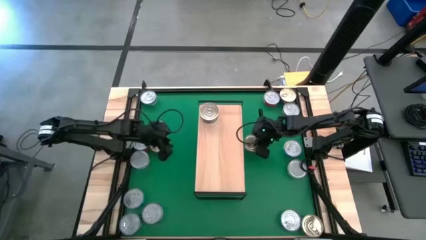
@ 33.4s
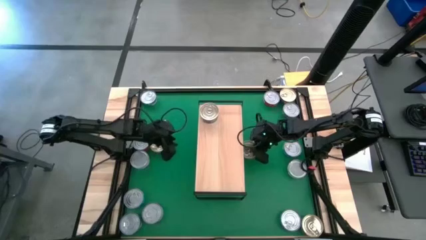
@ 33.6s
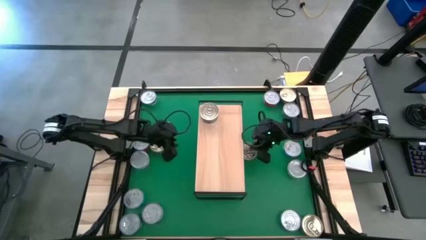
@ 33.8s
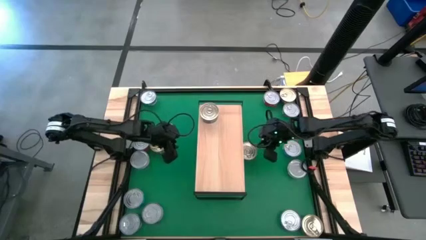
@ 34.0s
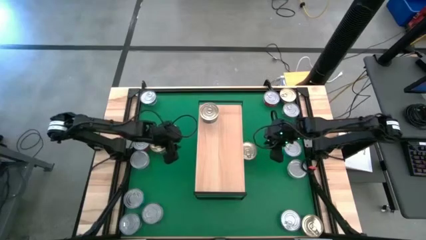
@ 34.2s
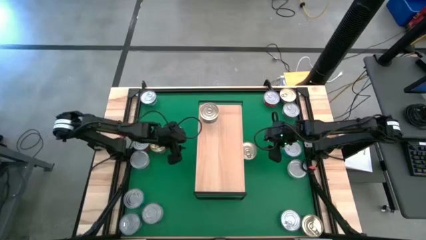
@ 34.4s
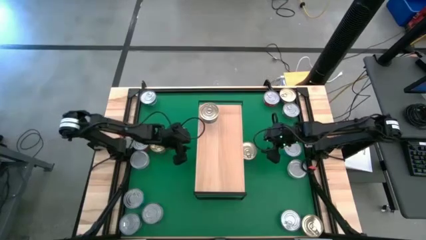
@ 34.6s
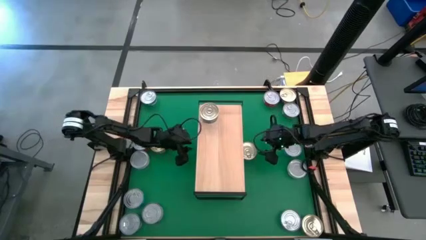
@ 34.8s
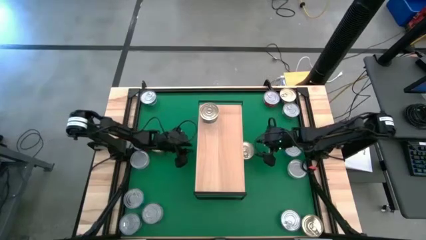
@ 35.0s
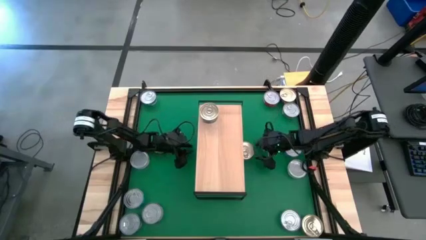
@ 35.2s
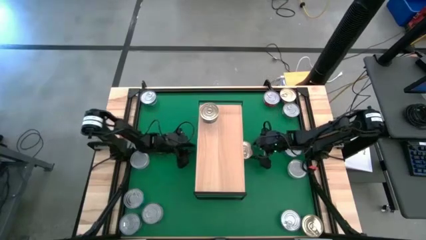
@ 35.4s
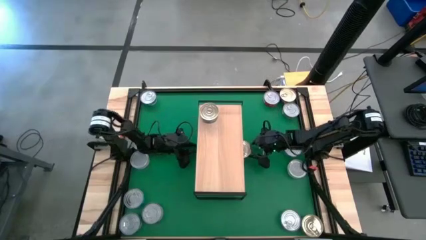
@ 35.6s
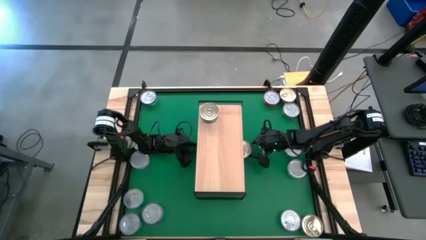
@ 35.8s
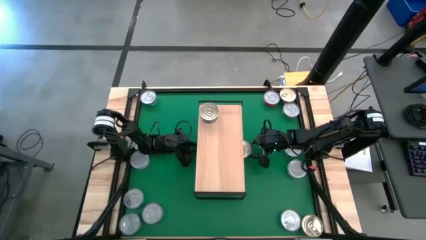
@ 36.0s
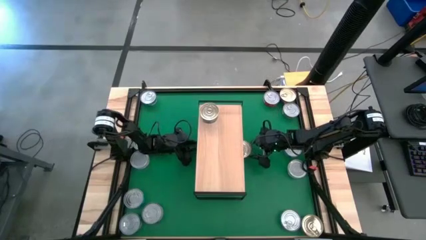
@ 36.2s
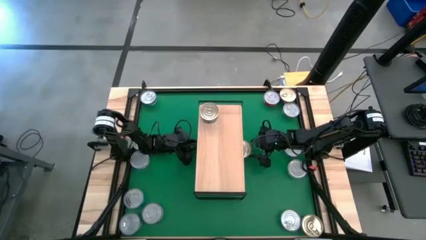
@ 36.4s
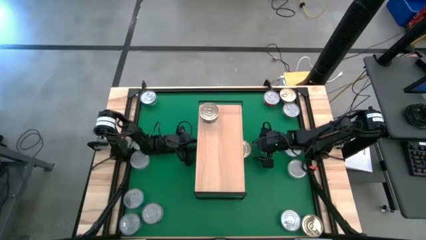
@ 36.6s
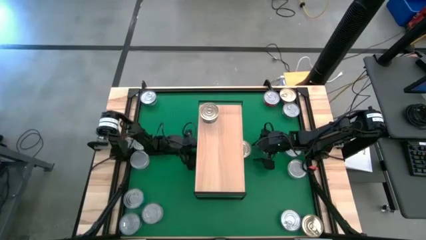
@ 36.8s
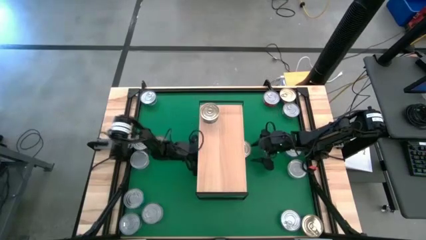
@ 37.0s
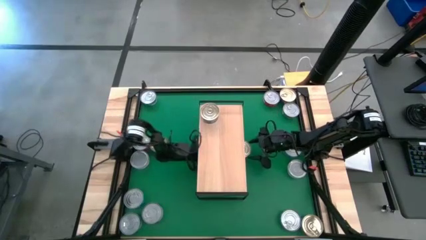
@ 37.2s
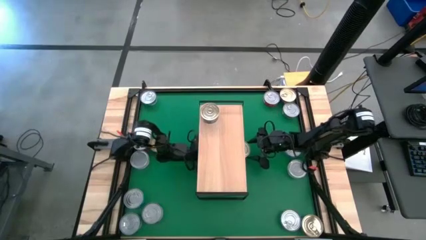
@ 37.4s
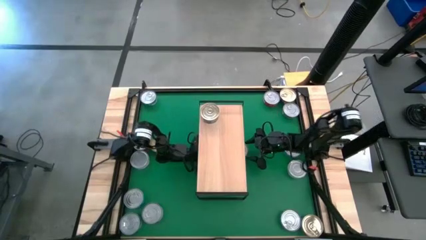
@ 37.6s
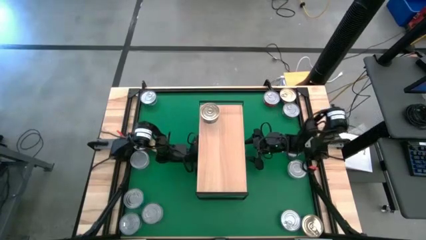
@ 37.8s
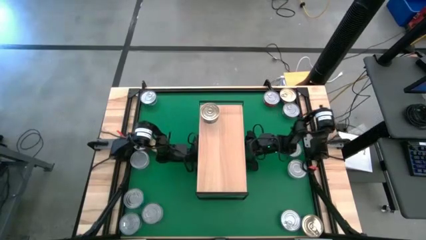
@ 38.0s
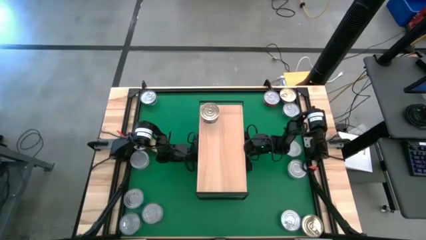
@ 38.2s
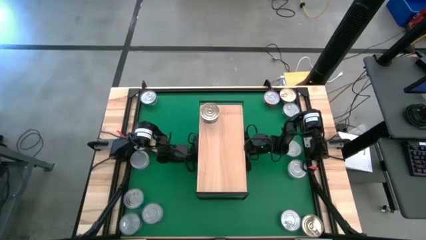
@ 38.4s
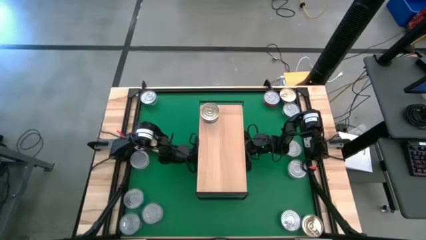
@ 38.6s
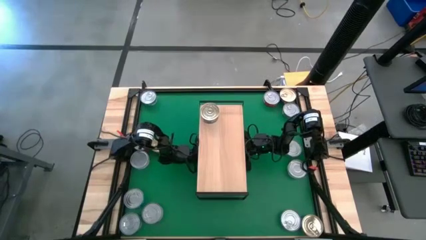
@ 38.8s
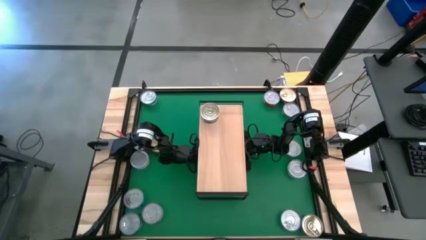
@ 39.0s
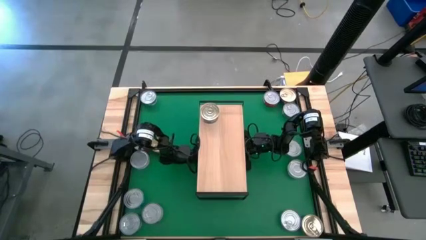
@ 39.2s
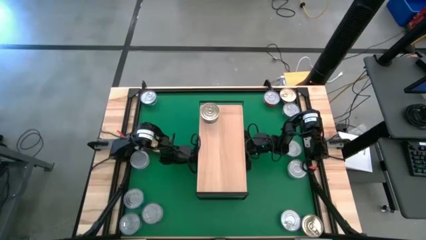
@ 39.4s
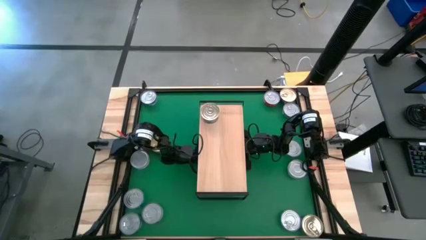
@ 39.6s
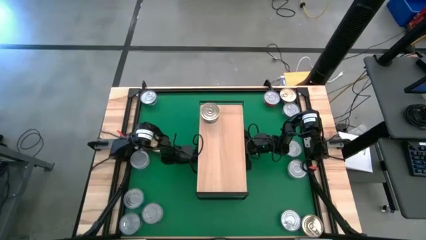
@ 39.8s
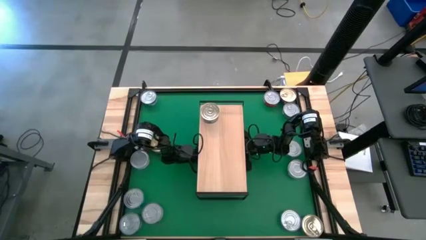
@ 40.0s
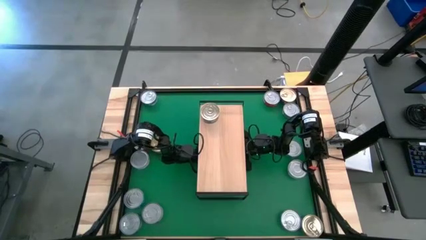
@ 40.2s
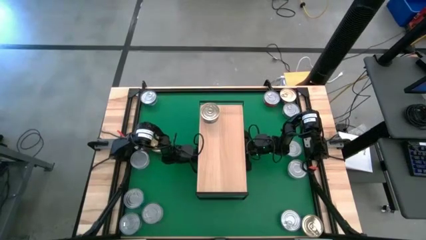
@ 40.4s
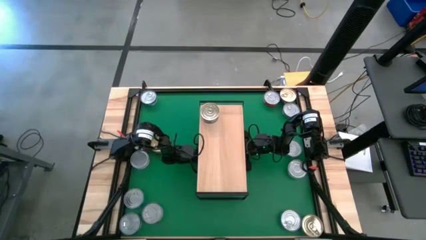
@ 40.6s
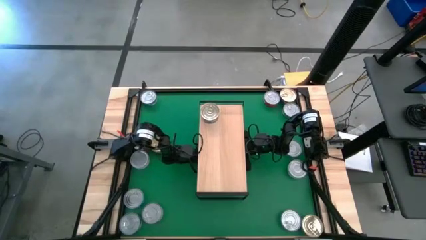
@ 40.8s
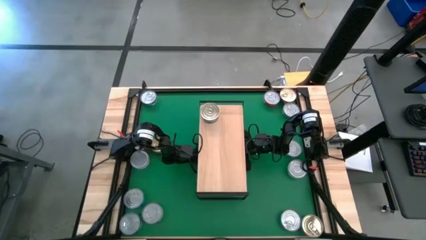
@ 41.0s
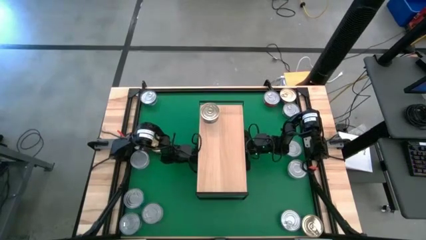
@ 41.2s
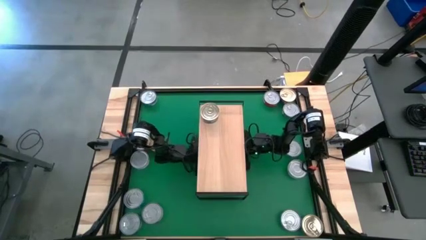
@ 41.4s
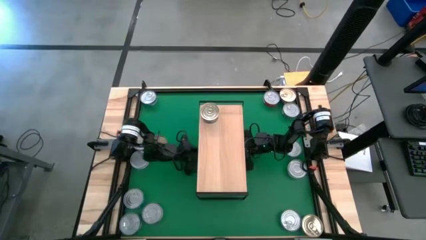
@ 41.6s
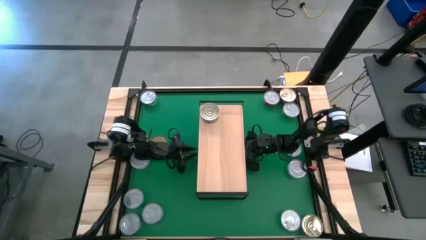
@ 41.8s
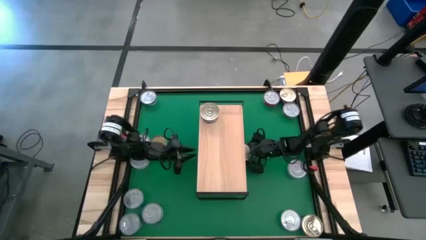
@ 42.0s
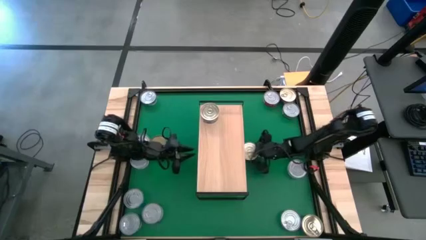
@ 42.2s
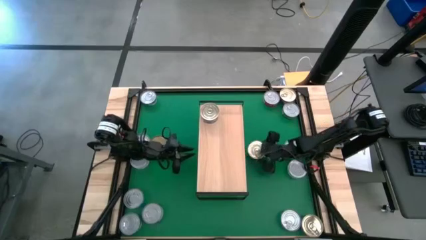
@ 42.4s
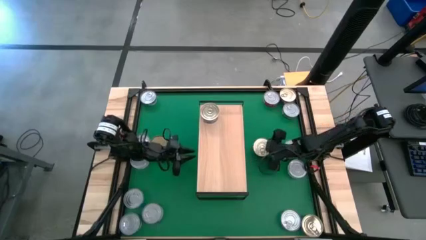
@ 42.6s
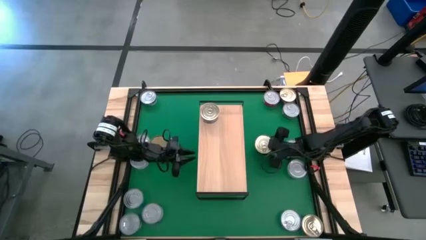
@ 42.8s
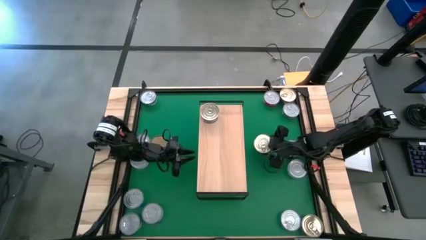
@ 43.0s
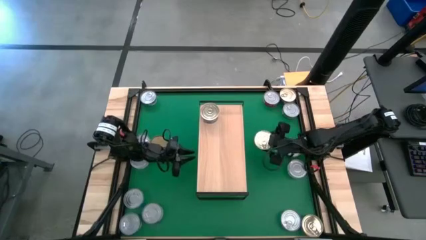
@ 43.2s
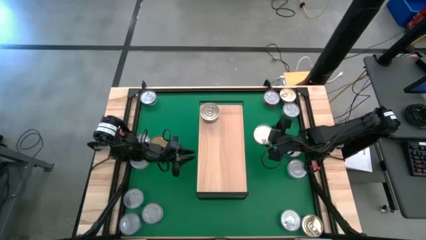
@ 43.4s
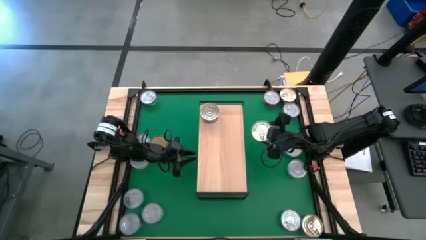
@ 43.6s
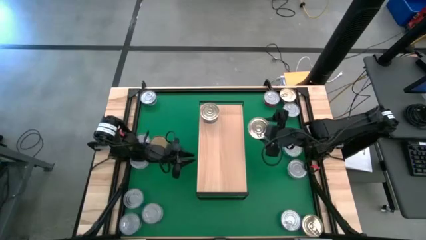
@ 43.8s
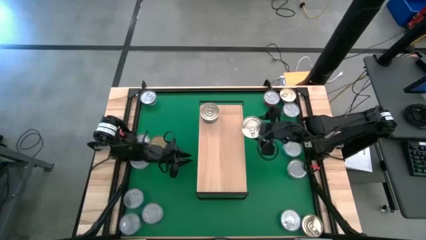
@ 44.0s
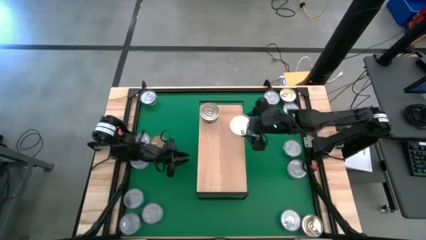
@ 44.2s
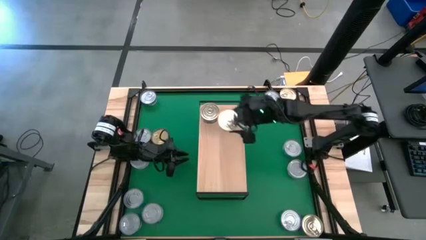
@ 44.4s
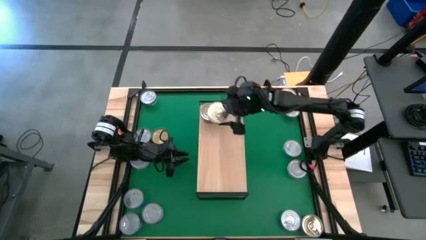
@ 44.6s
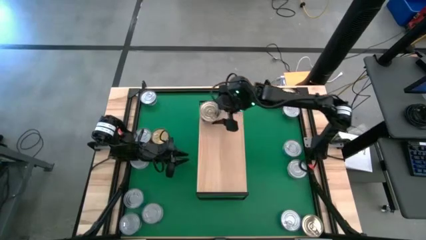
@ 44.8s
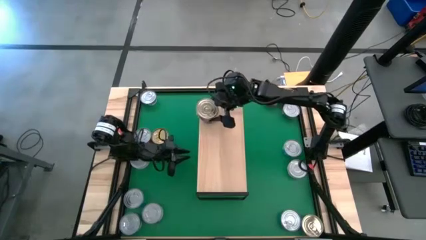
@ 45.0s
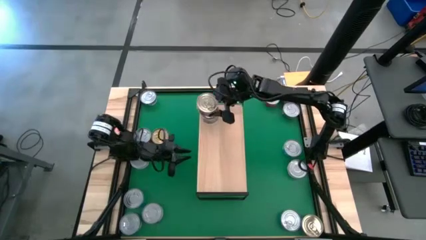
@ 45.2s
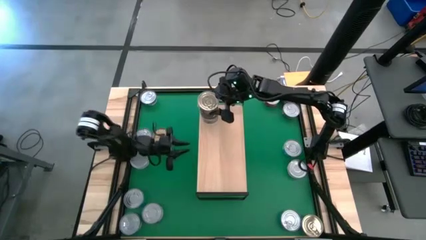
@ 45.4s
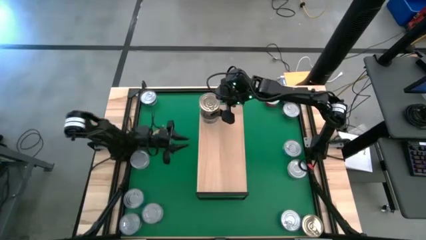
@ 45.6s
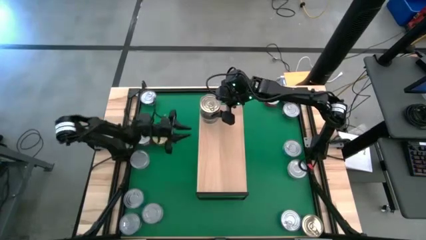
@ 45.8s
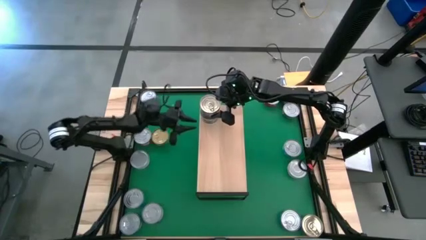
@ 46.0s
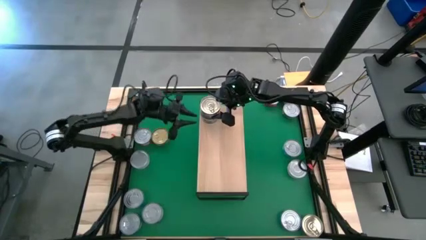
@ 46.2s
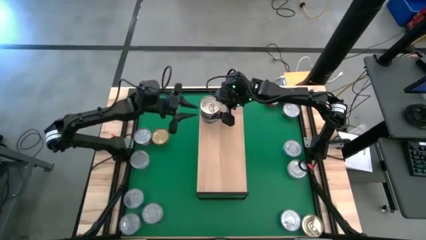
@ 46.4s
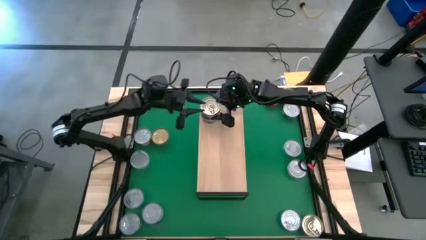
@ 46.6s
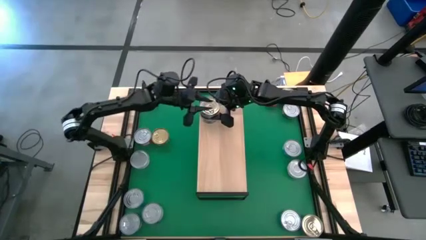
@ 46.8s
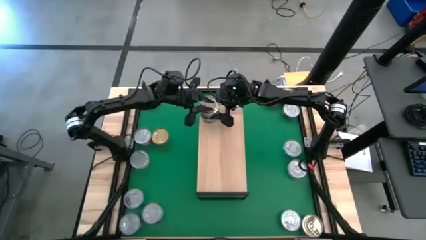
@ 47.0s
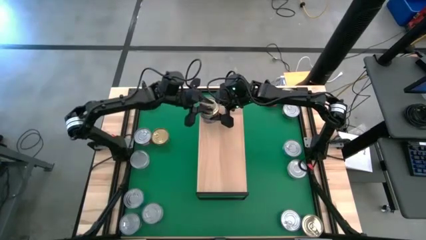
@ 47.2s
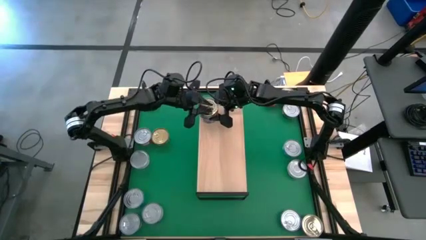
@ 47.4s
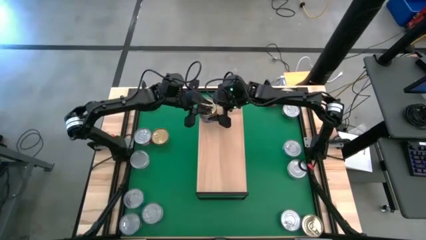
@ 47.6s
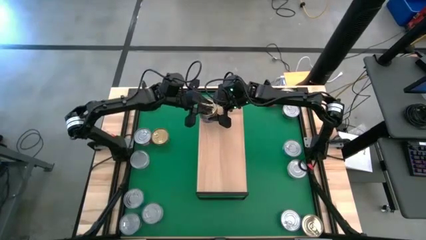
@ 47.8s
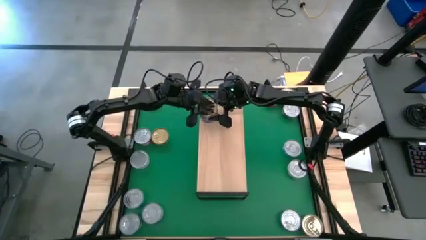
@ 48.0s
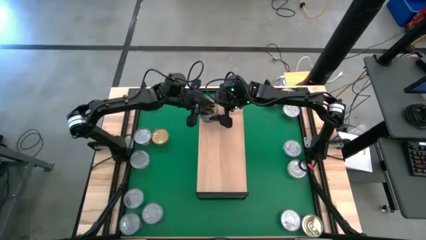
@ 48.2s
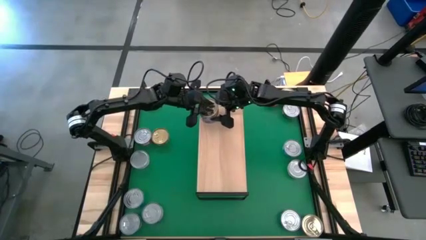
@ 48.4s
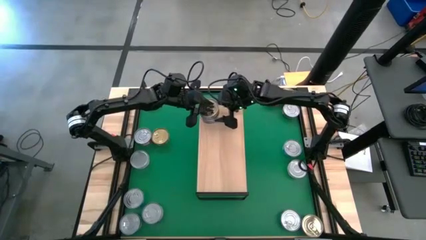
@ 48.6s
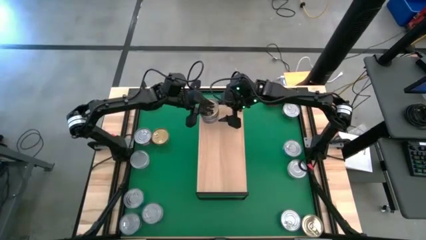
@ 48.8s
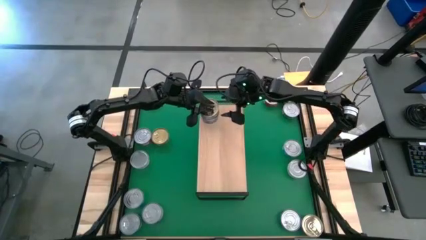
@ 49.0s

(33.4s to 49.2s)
Task: Stack canned seafood by type on shelf
Stack the blue pink tuna can on top of the other blue pink tuna can on the shelf
